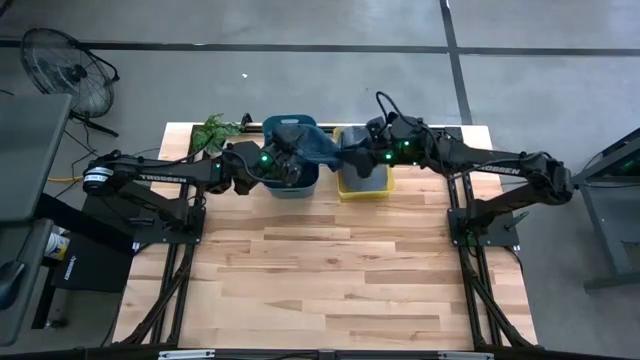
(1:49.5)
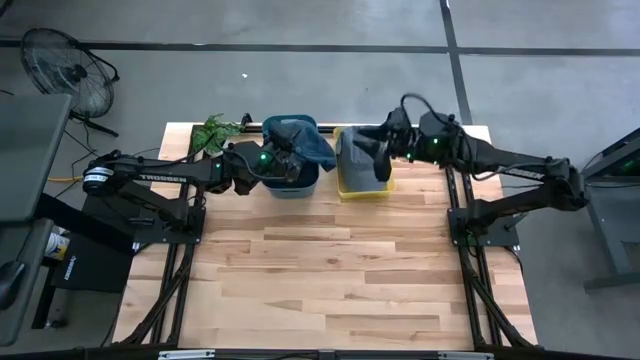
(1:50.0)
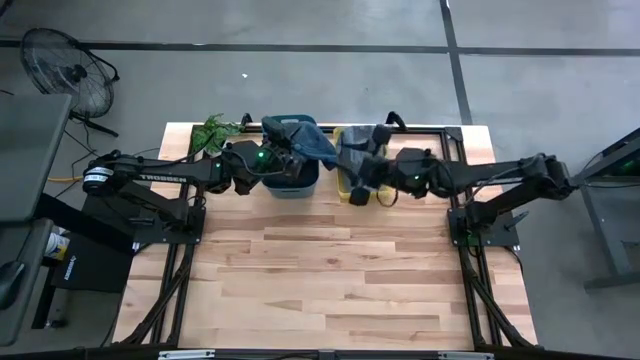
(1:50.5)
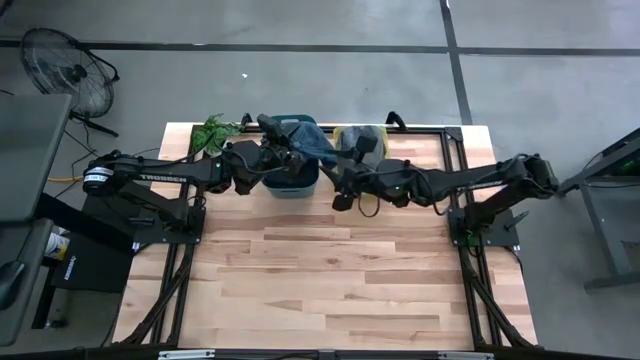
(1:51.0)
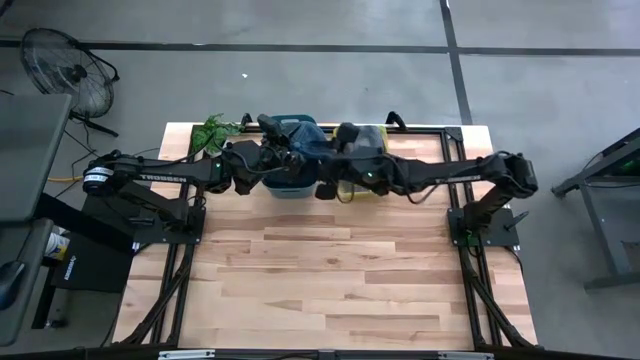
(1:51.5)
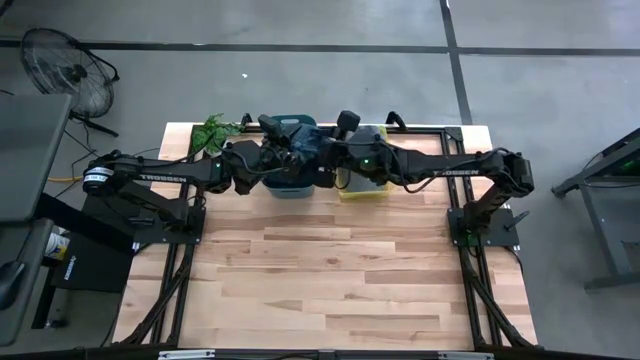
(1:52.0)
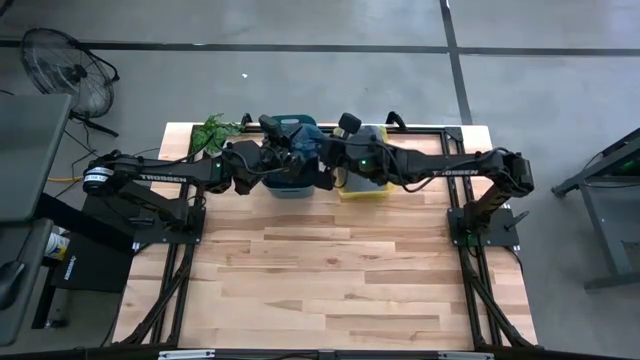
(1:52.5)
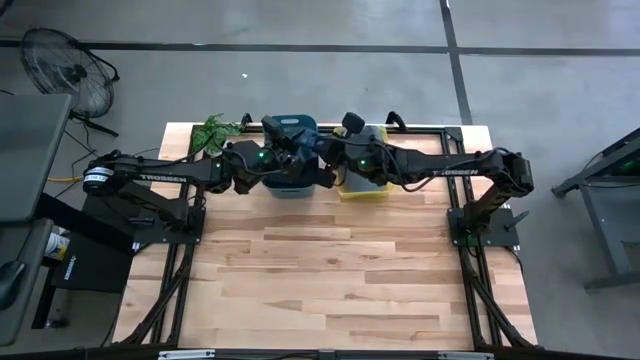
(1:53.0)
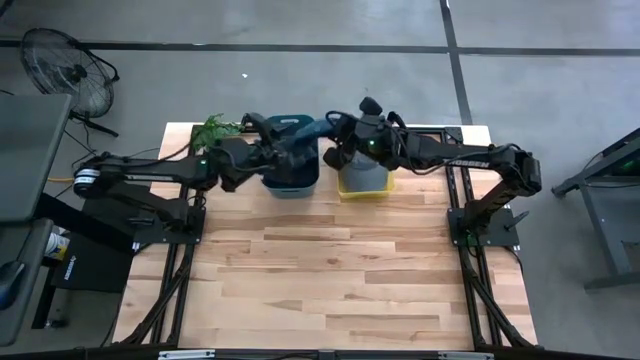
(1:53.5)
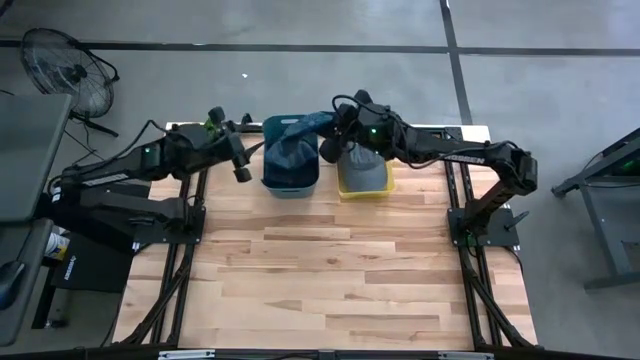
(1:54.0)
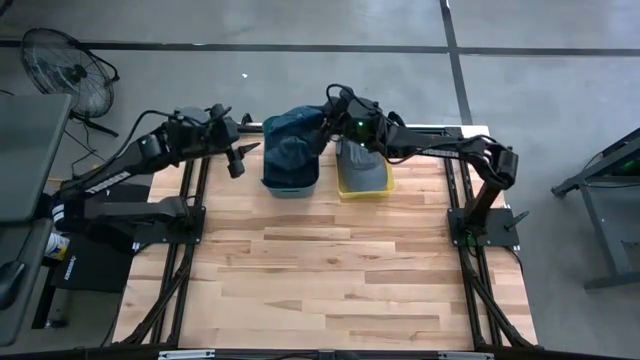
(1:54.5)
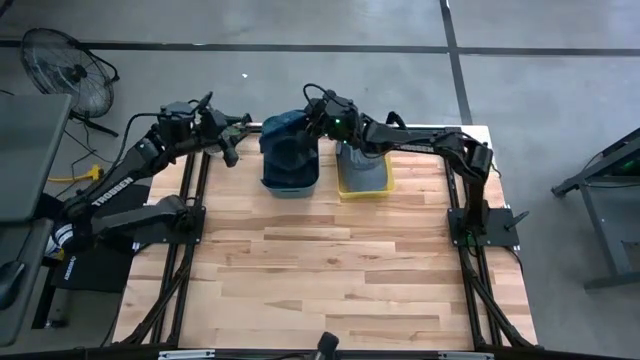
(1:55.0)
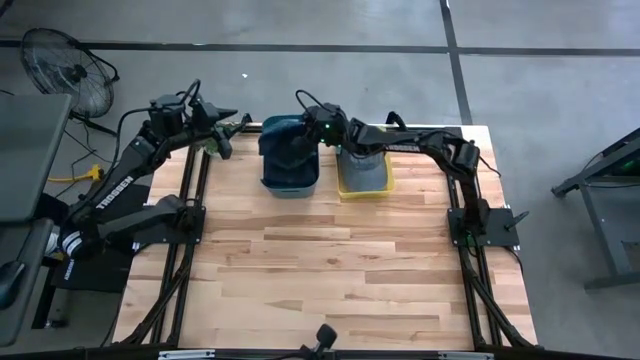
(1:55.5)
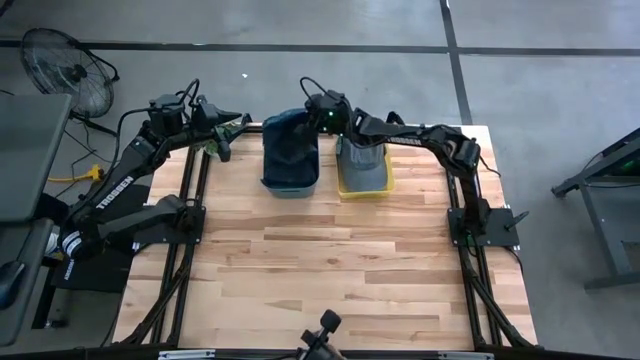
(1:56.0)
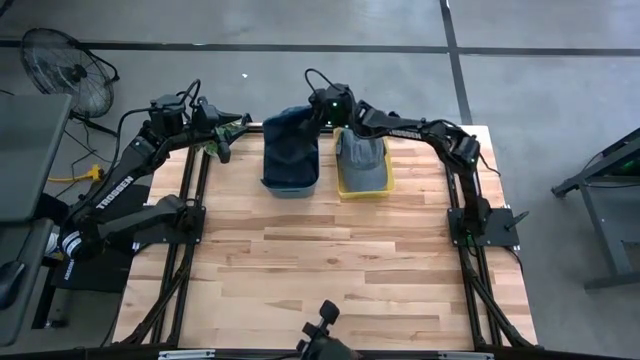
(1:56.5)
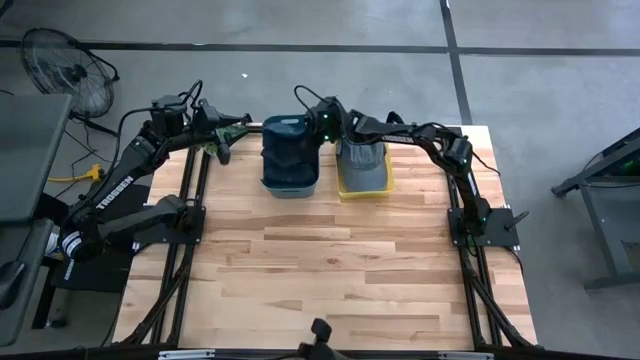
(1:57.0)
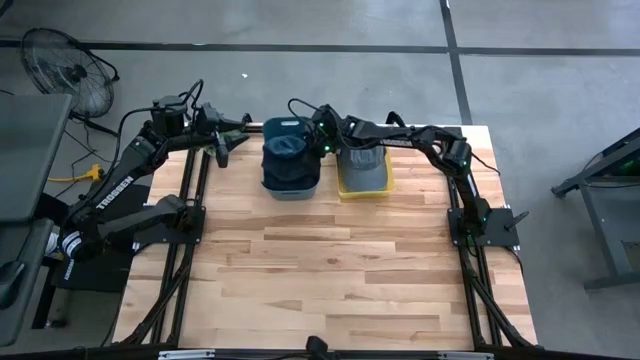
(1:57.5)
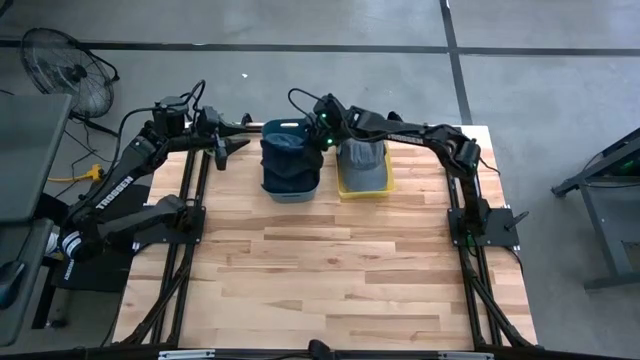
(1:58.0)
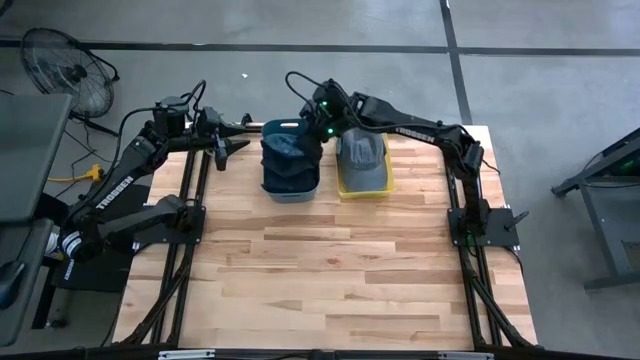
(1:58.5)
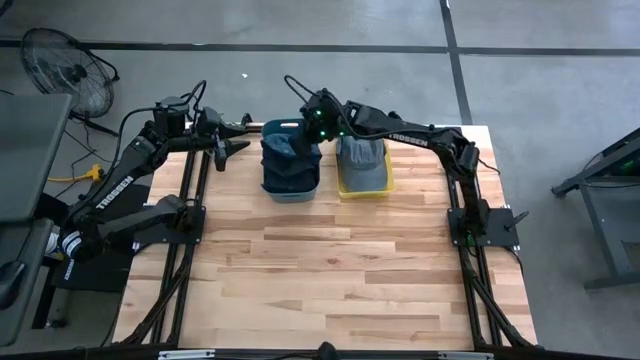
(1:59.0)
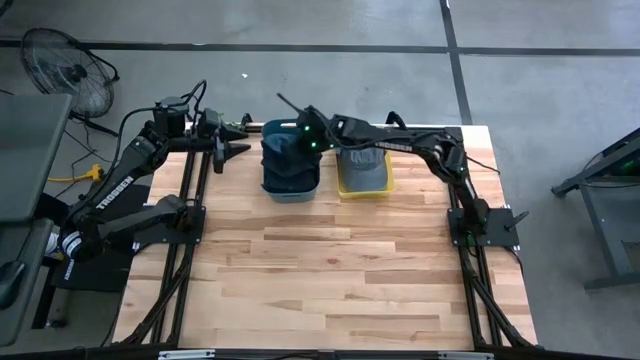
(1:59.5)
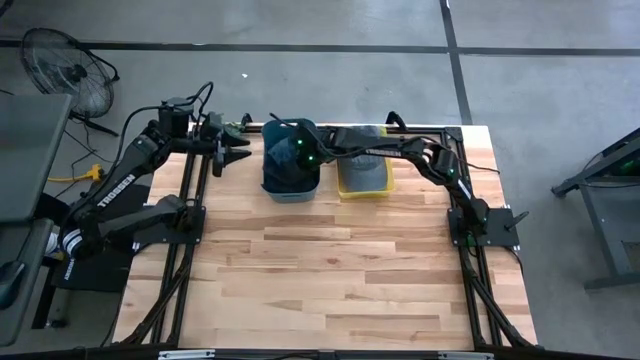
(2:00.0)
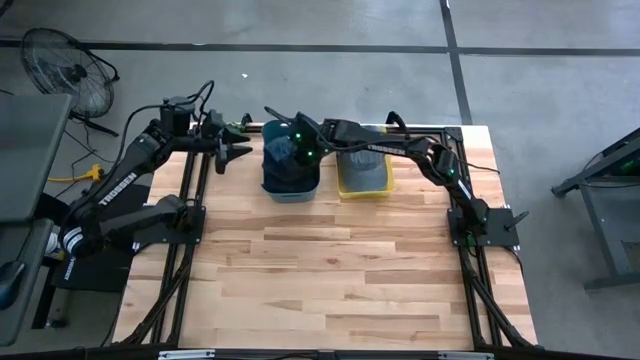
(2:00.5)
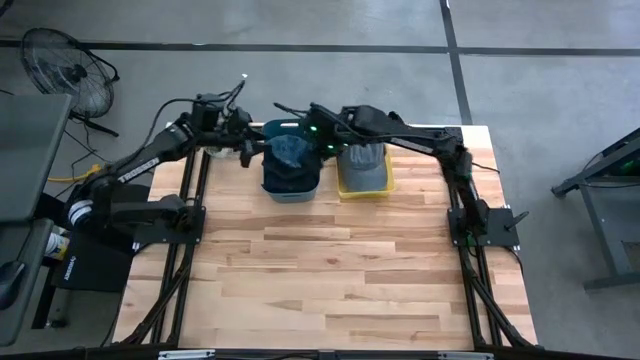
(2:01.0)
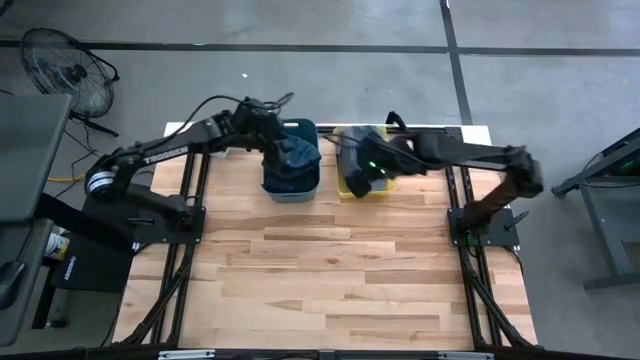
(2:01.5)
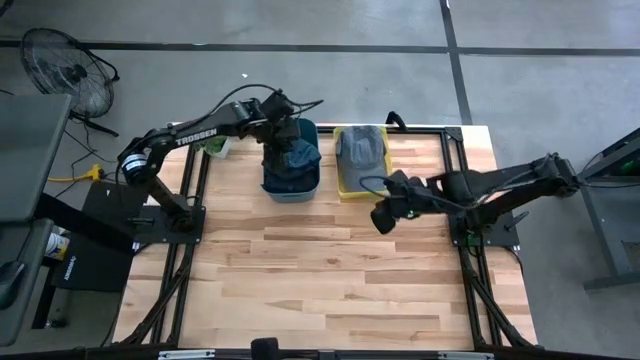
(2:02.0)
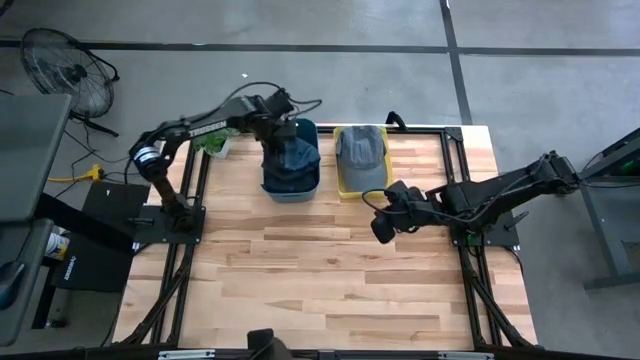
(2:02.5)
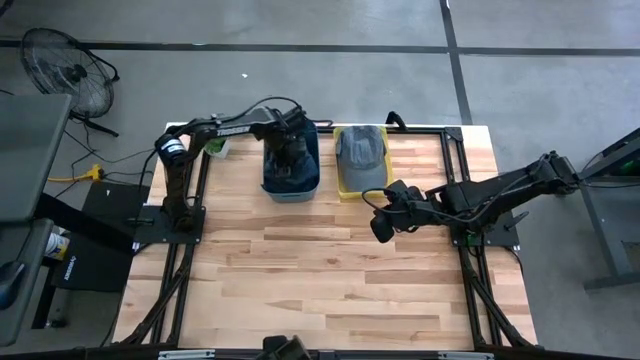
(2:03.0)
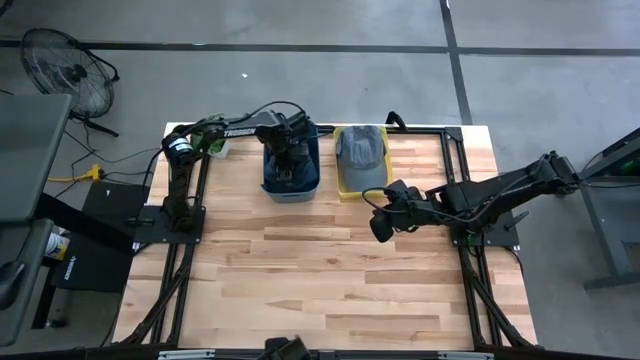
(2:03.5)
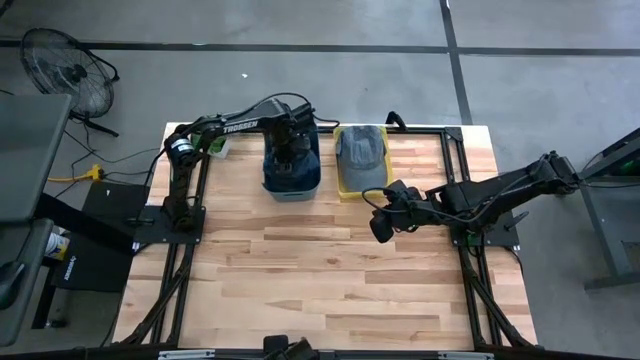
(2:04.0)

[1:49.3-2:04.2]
Task: Pick & Place hat
Put the blue cap into the blue bin

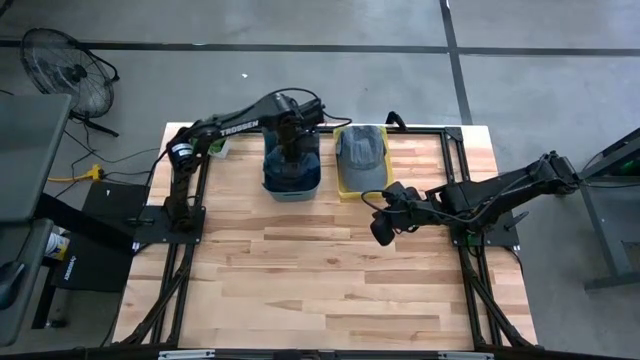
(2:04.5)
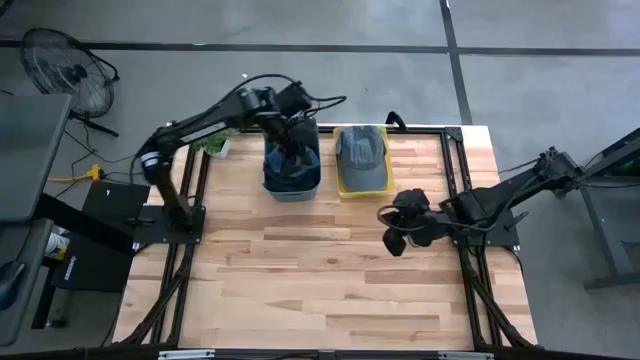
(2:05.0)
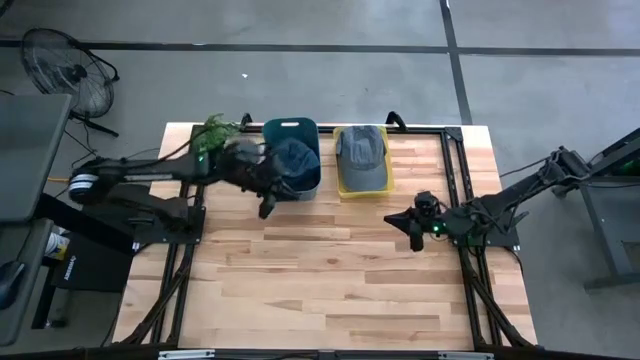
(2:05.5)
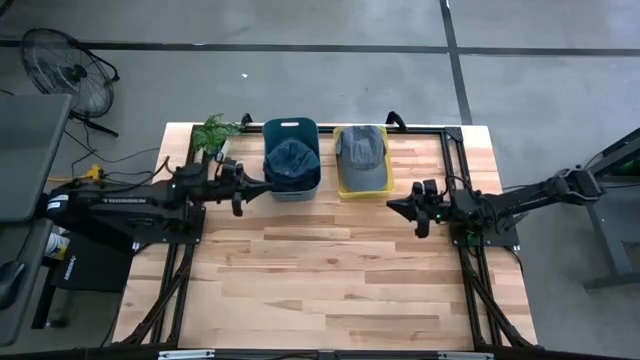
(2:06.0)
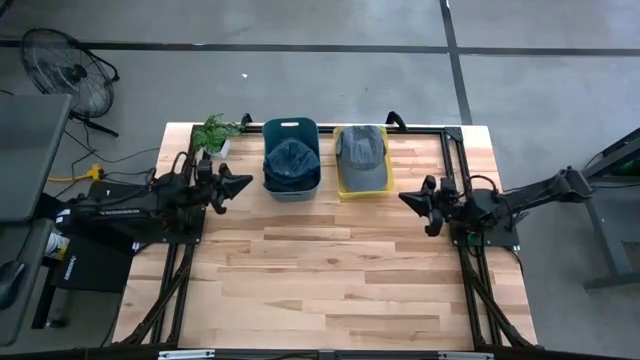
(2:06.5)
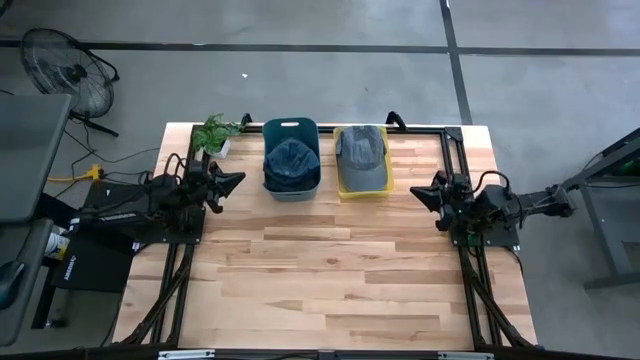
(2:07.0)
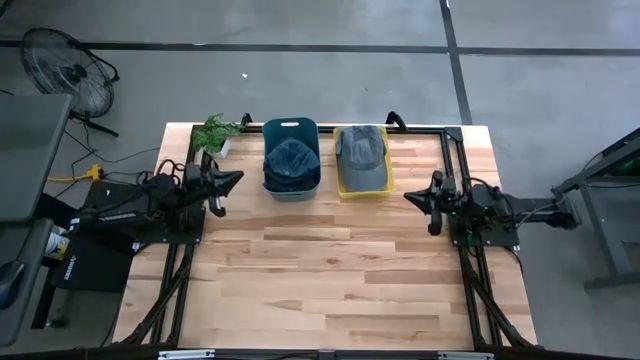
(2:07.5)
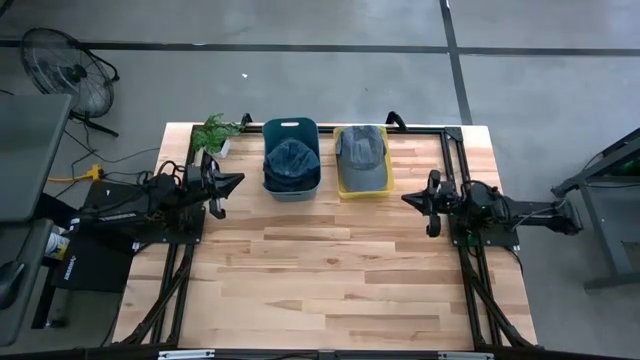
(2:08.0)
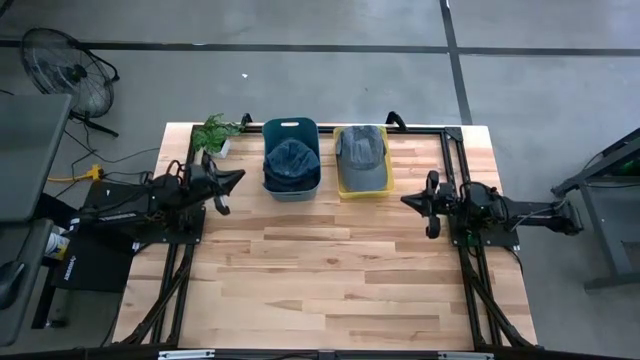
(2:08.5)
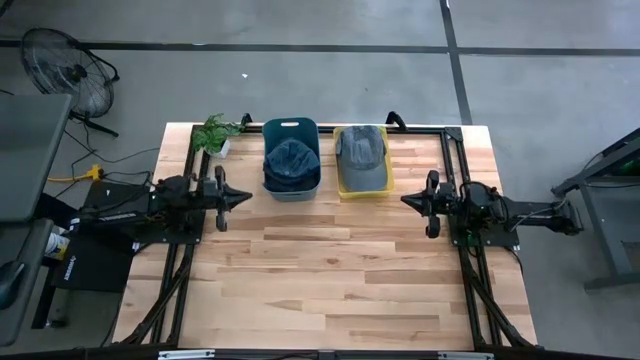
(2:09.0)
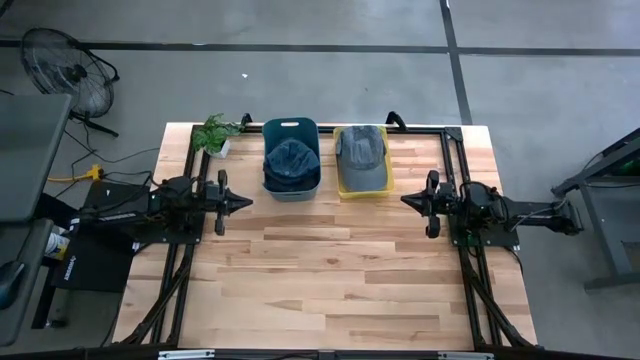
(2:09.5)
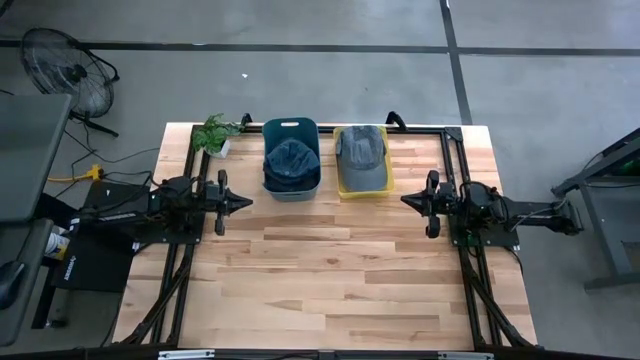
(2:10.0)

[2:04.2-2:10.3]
Return to Home Position

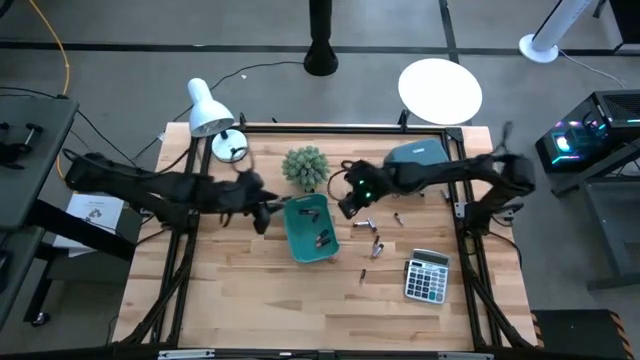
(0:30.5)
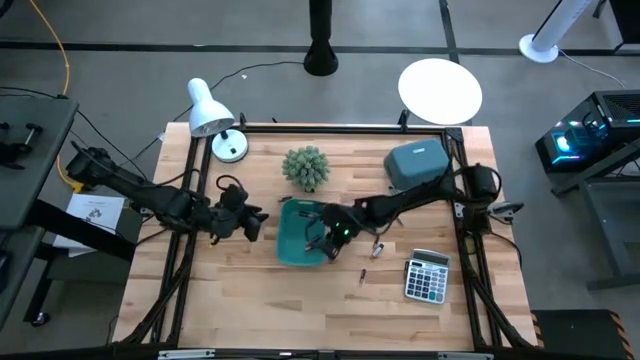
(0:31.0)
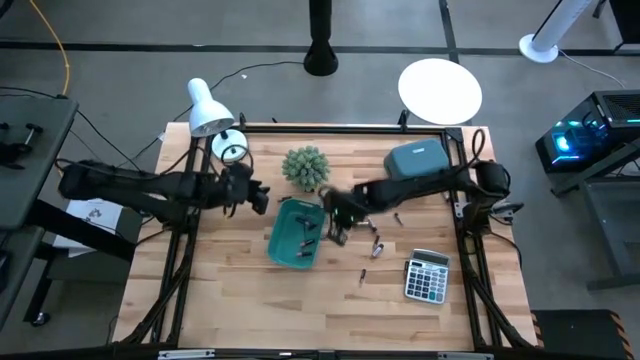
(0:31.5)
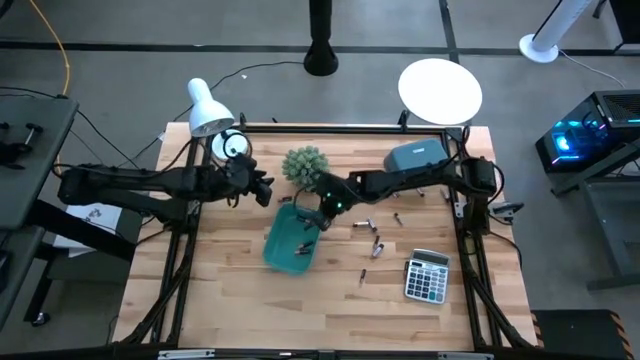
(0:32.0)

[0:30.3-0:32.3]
Task: Sort batteries
Adjust the green bin
